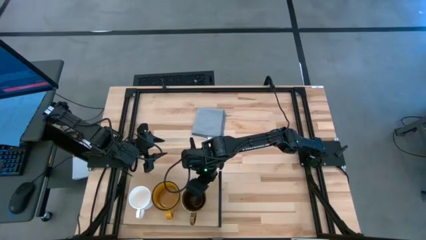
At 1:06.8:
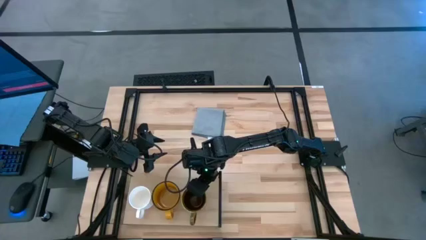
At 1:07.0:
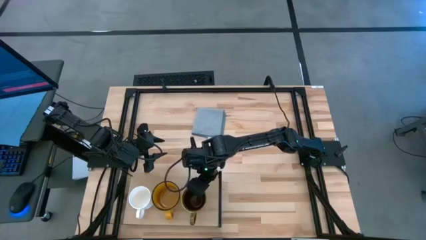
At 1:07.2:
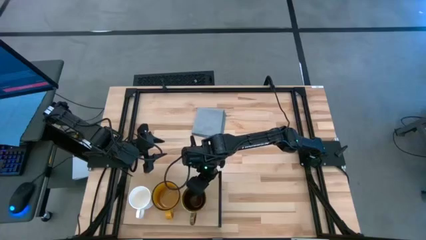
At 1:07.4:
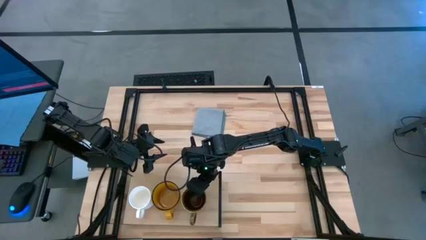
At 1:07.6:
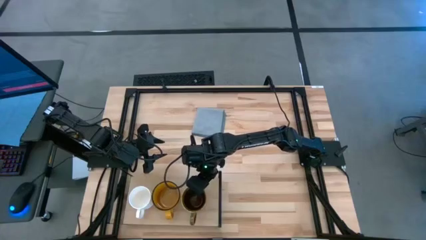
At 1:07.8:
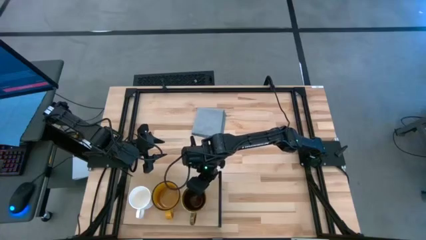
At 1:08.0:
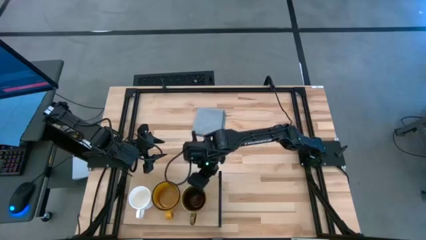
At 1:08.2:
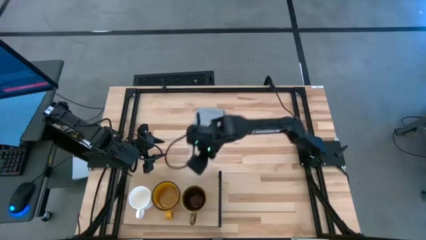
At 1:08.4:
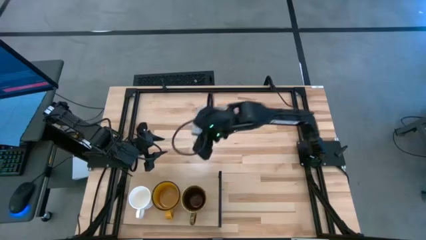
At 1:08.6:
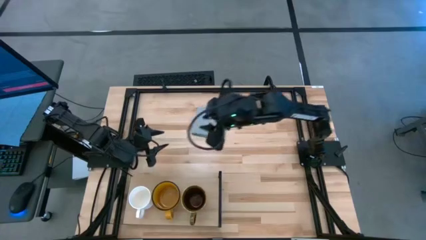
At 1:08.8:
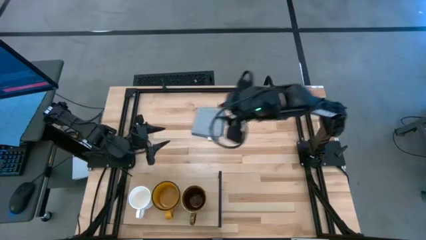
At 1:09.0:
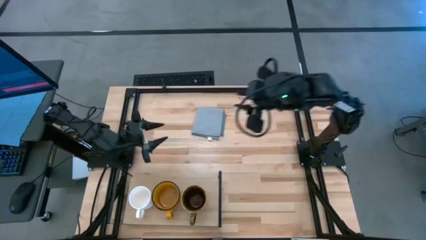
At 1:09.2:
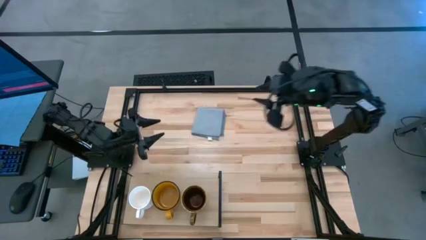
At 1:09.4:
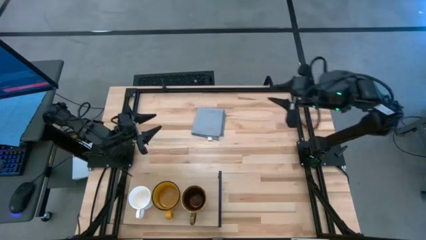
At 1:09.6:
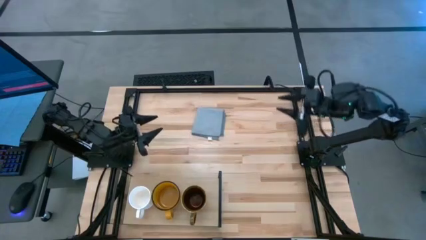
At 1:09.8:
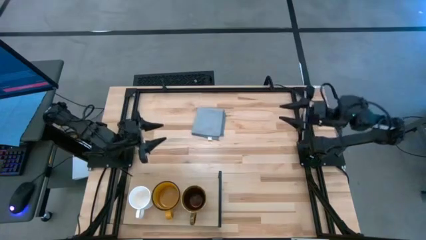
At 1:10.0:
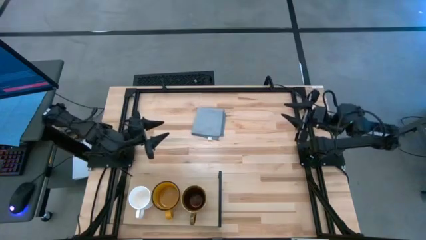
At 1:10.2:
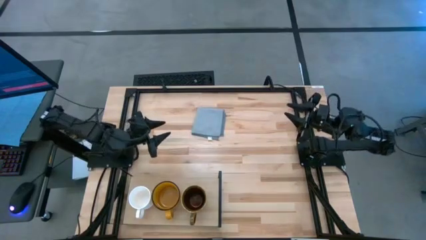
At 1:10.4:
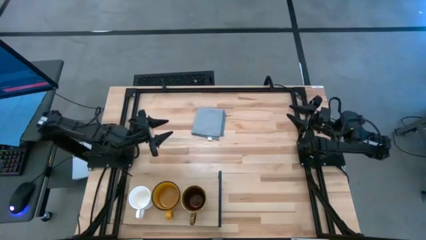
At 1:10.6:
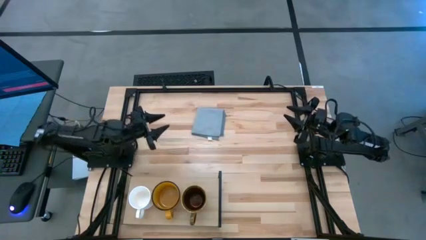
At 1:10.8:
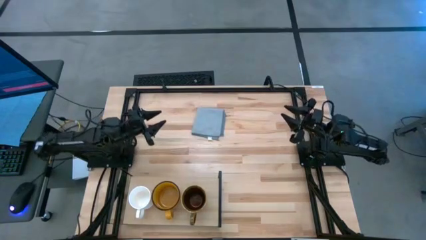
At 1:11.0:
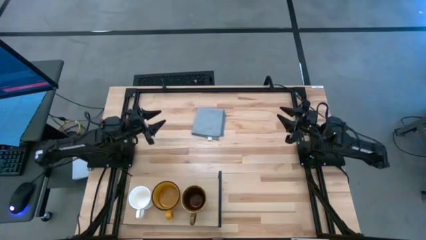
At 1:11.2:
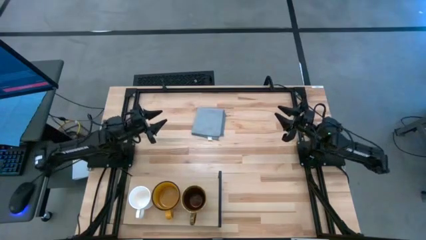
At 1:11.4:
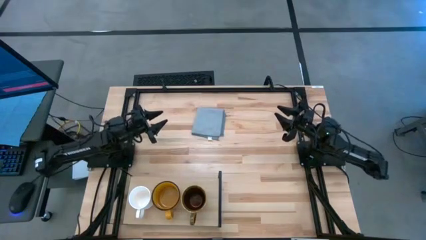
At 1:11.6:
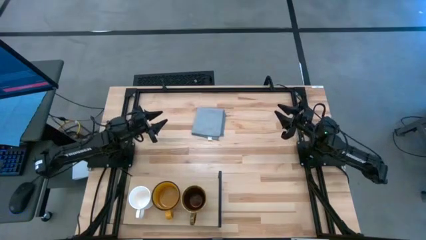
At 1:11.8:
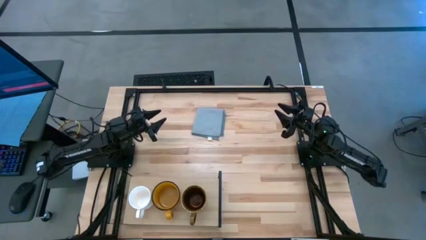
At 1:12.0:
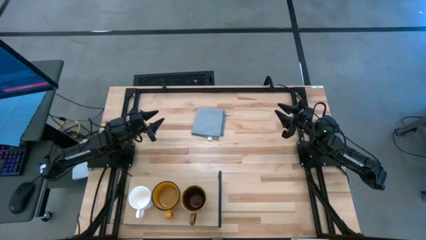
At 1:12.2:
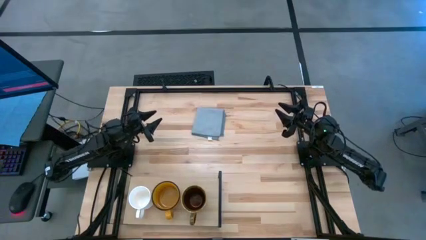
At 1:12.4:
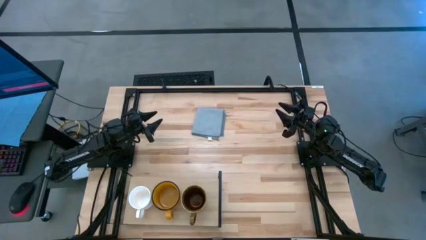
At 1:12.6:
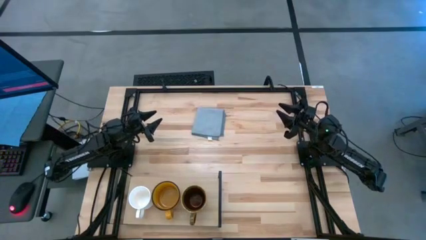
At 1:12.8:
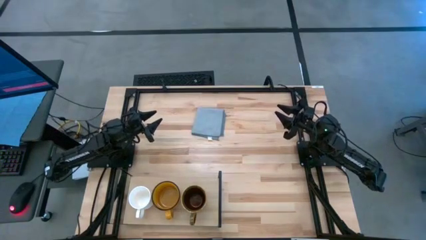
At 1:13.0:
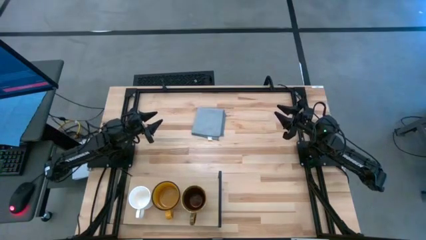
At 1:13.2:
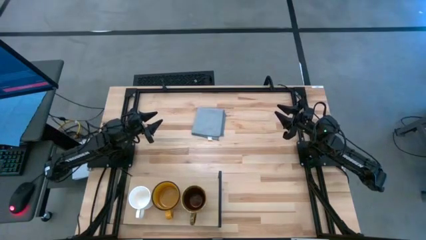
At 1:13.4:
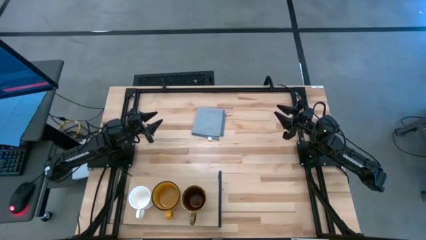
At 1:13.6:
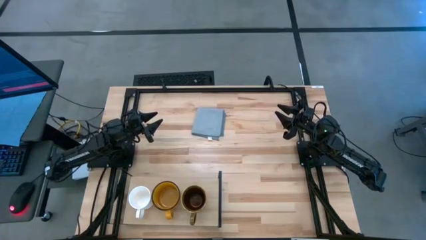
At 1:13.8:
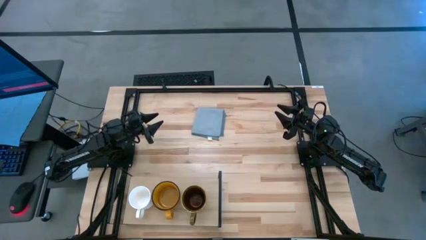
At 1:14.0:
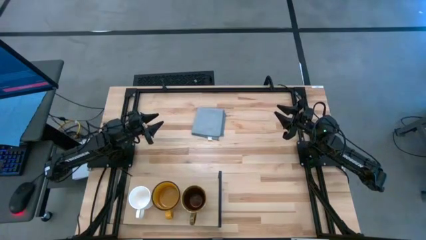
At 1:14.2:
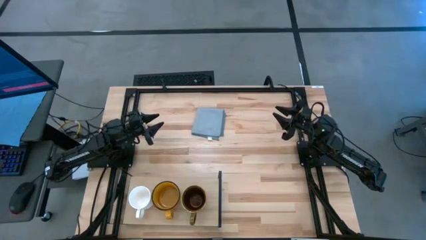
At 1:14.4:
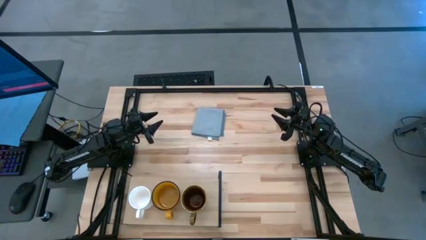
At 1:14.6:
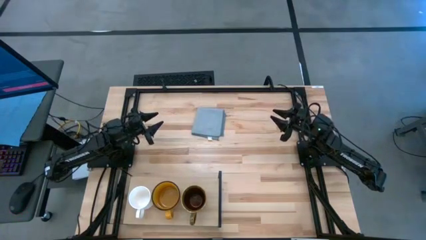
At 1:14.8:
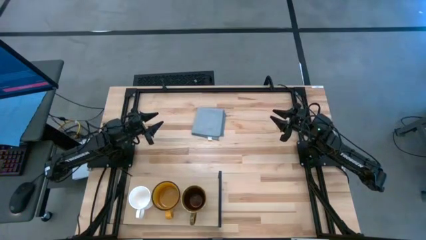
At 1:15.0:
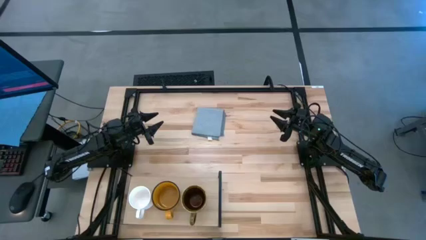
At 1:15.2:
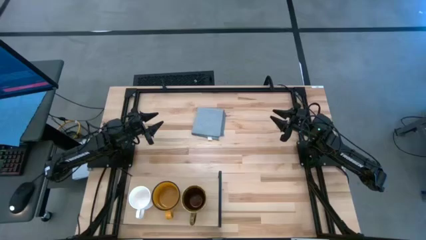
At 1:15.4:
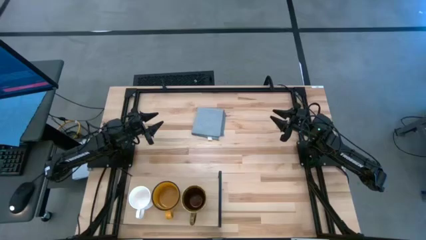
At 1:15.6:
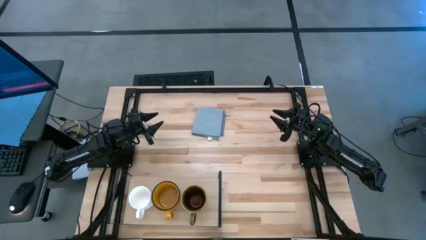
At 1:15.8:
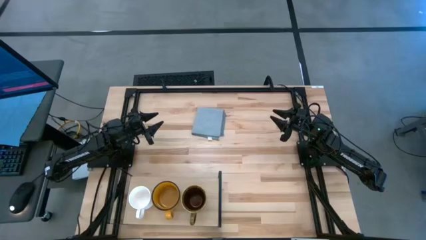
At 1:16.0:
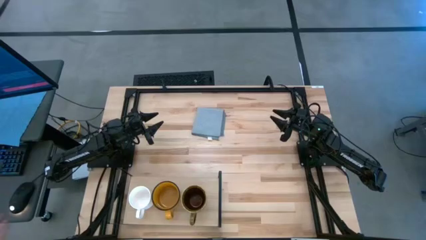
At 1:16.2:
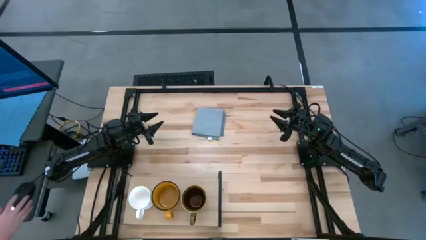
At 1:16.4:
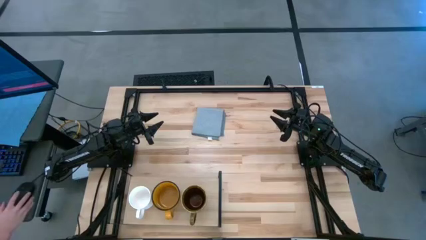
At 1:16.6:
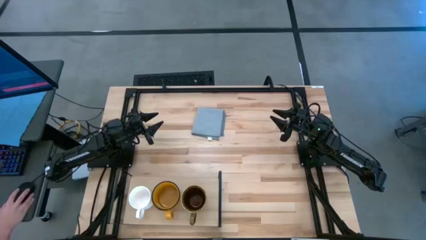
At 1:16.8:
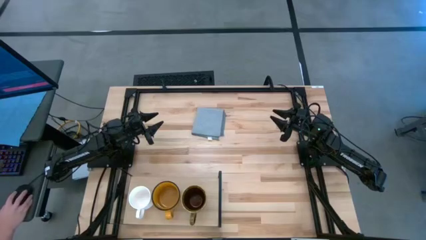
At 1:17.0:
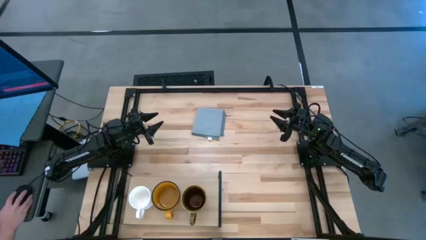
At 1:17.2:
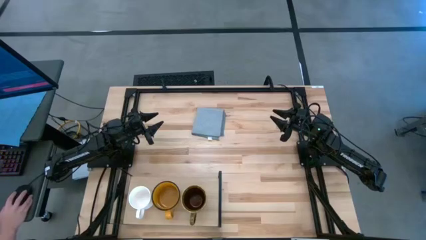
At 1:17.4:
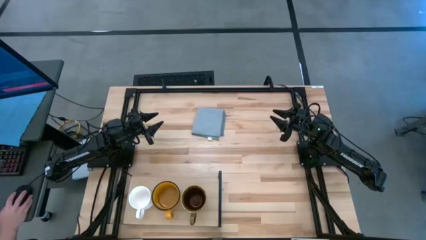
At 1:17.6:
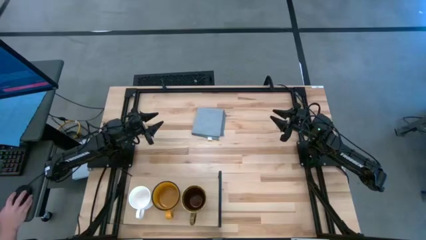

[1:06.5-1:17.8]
Task: Stack small to large cups/mugs on shelf
Return to Home Position

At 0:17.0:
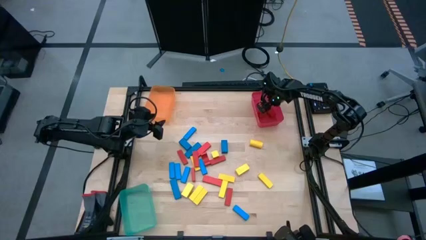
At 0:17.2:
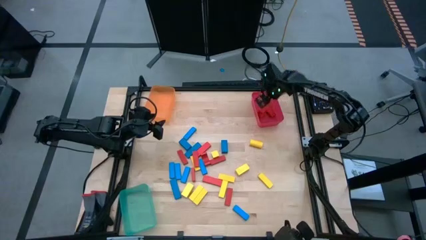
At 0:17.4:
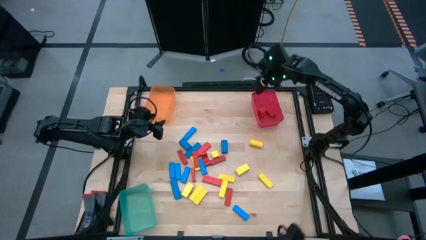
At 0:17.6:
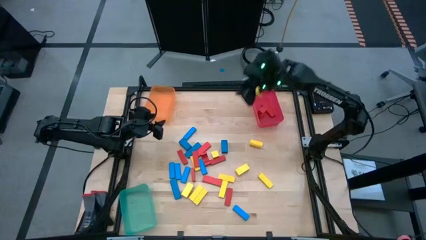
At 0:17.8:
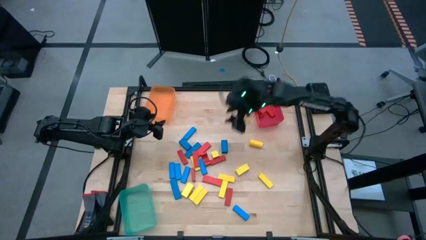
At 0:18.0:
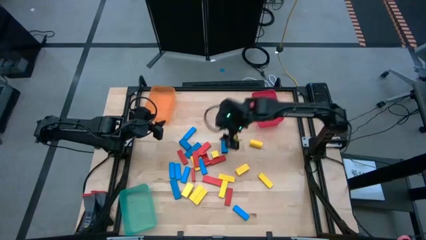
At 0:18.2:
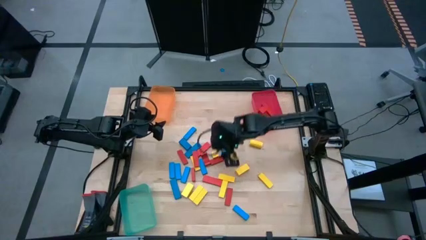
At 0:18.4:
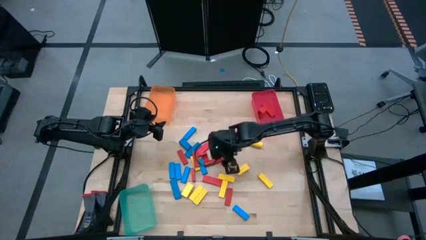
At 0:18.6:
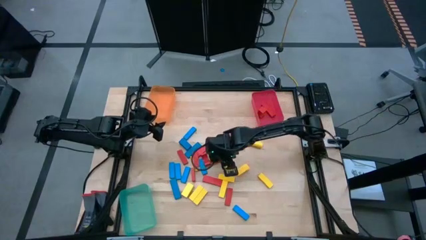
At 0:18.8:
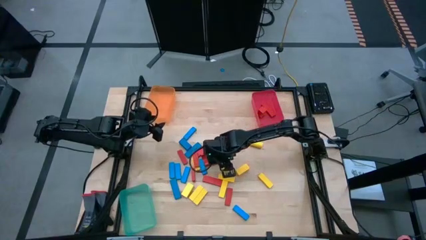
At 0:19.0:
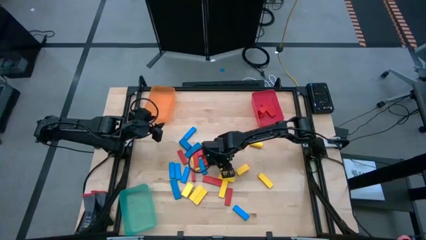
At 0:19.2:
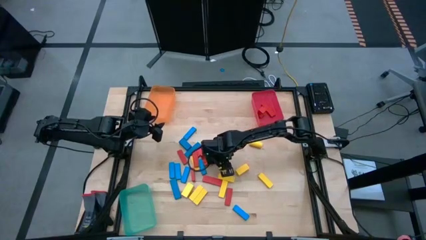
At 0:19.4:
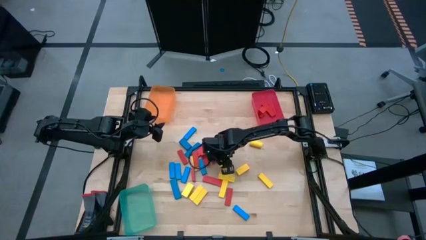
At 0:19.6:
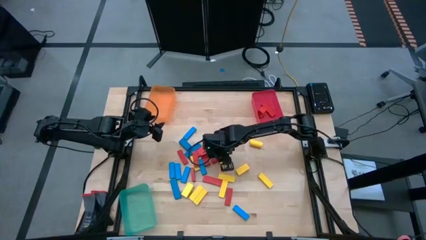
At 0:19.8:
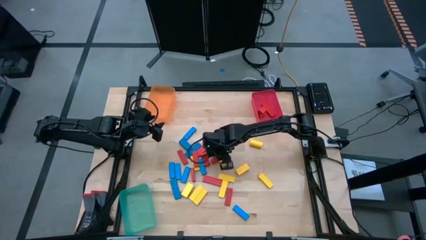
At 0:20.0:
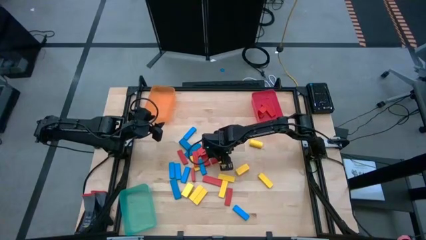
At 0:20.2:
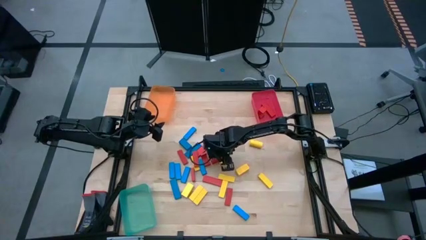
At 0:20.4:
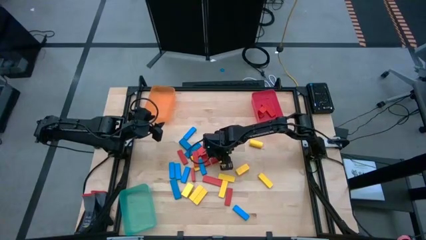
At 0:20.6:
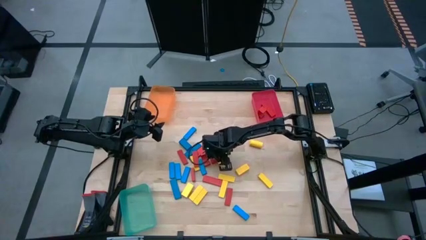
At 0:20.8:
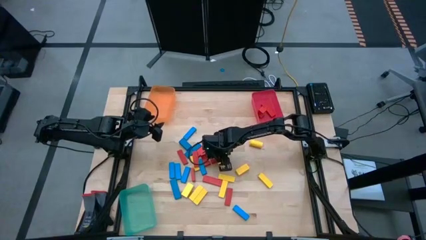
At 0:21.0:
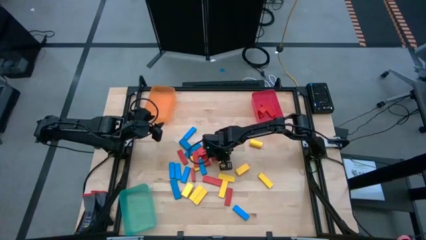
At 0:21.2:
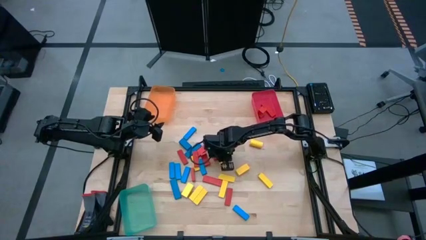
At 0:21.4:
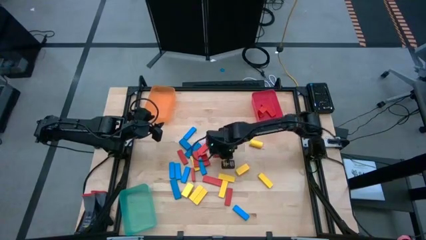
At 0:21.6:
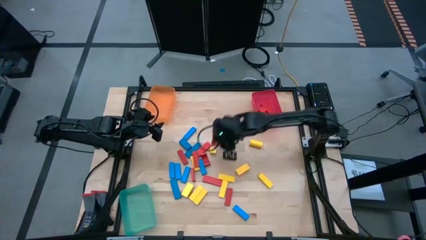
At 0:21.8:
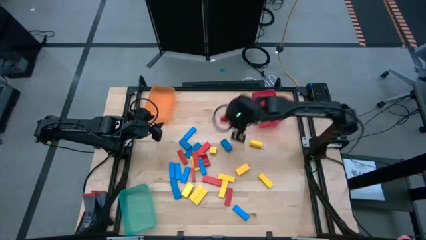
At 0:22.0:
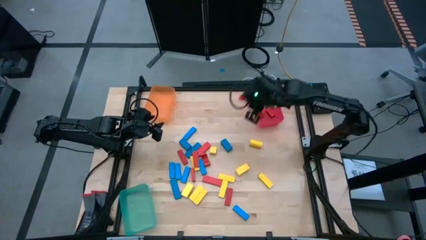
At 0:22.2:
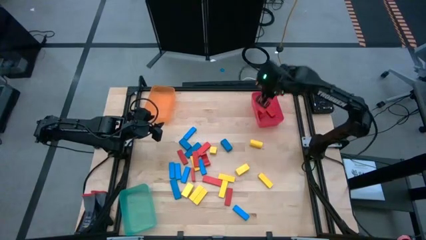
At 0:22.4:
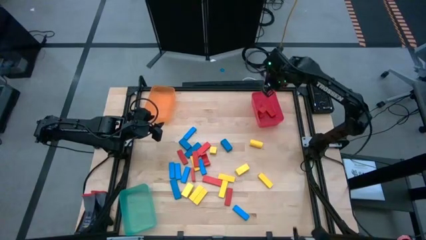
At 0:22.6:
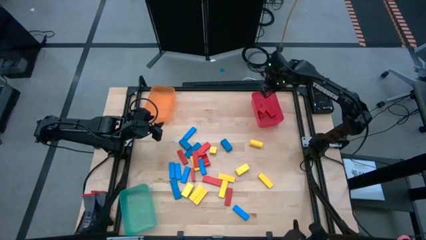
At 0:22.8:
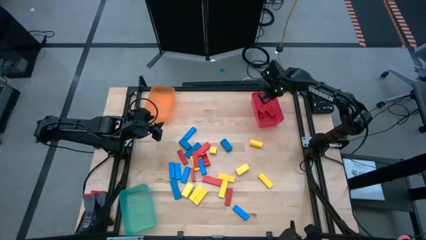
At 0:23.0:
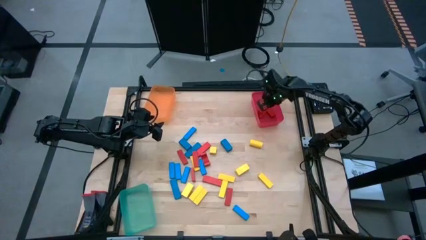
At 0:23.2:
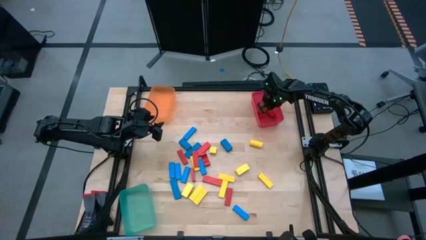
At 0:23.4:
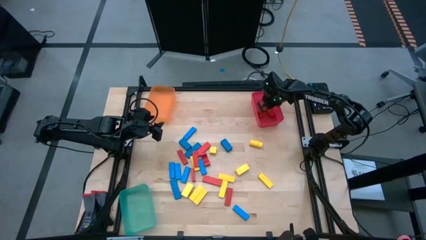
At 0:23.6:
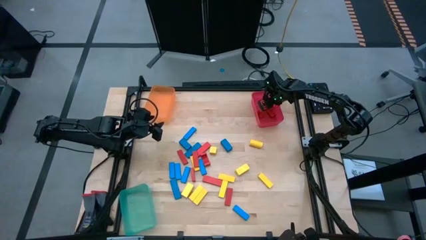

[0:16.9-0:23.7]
Task: Sort blocks
Put the red block into the red transparent bin
